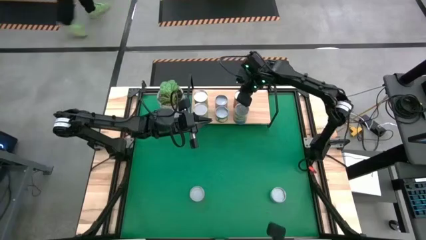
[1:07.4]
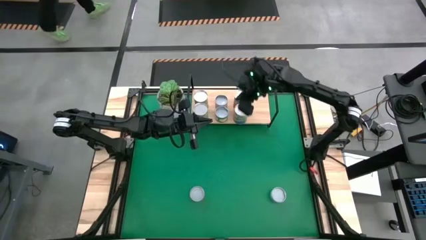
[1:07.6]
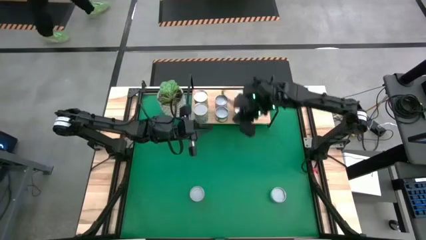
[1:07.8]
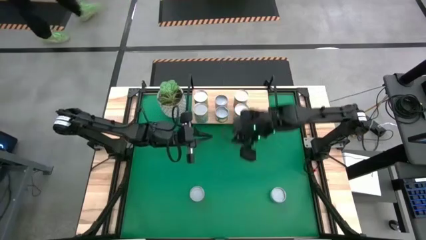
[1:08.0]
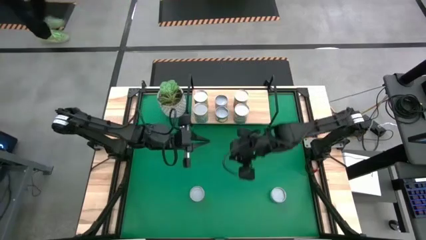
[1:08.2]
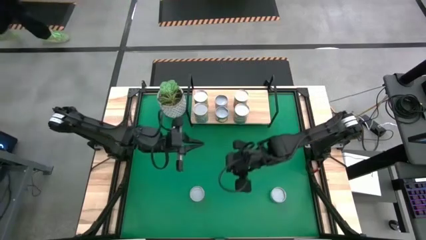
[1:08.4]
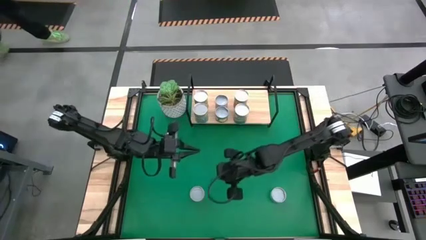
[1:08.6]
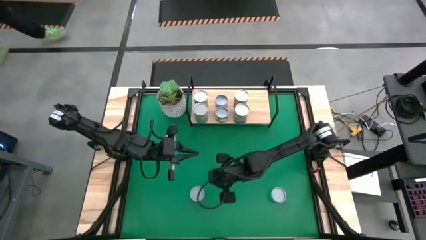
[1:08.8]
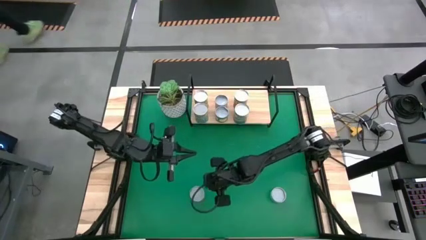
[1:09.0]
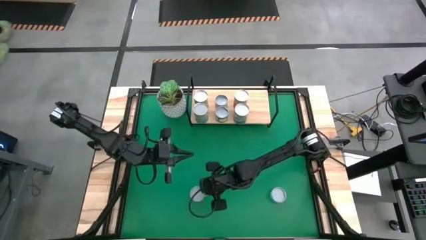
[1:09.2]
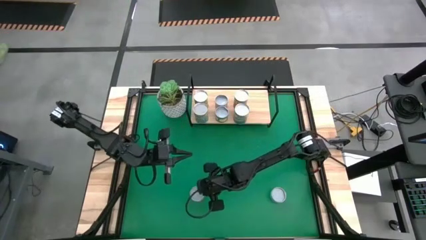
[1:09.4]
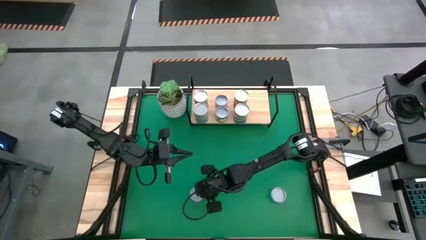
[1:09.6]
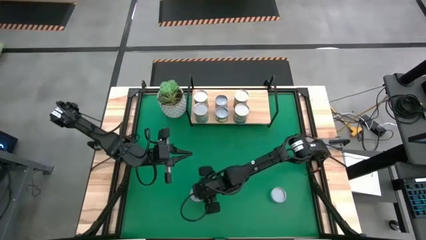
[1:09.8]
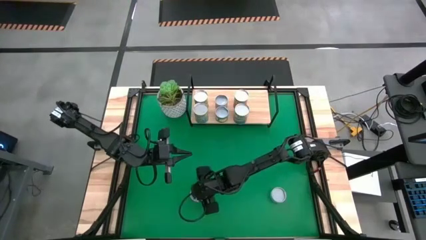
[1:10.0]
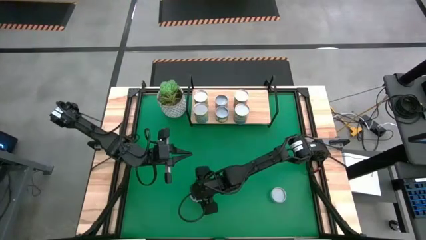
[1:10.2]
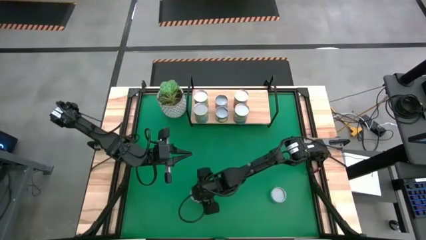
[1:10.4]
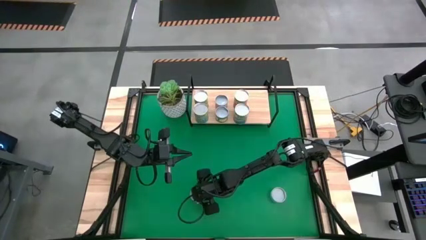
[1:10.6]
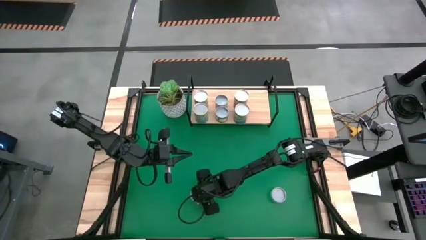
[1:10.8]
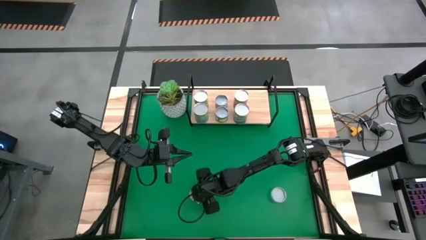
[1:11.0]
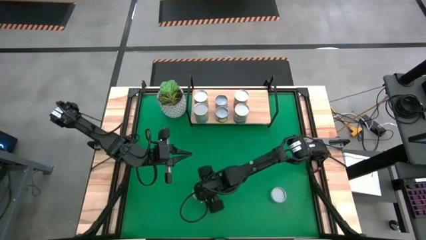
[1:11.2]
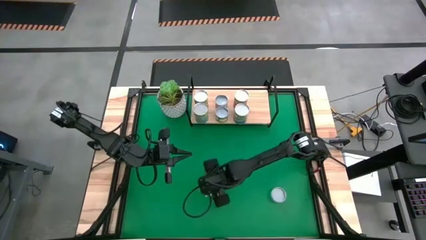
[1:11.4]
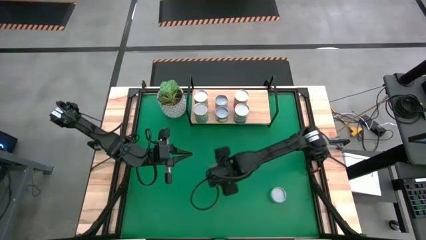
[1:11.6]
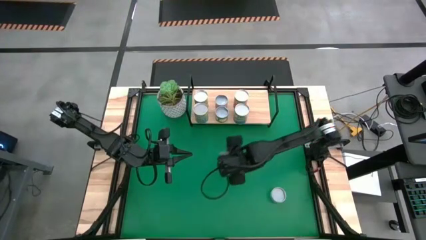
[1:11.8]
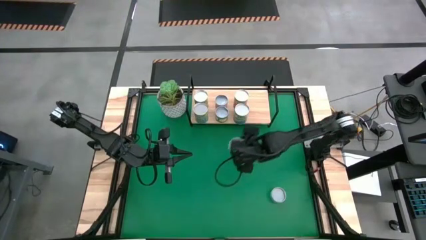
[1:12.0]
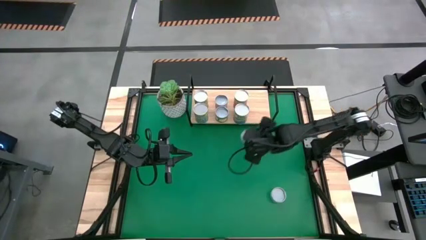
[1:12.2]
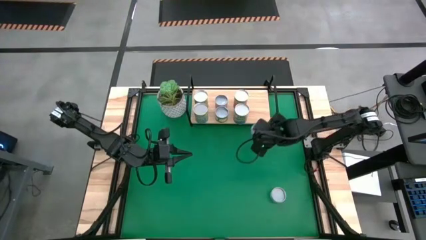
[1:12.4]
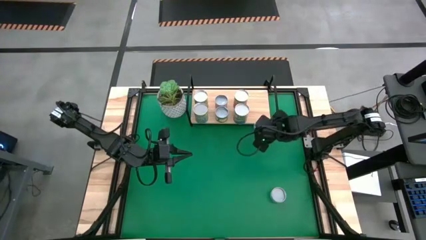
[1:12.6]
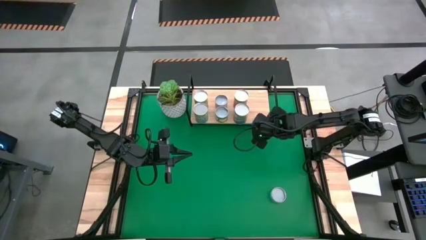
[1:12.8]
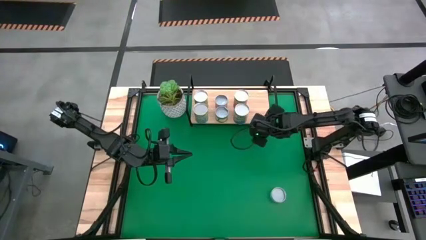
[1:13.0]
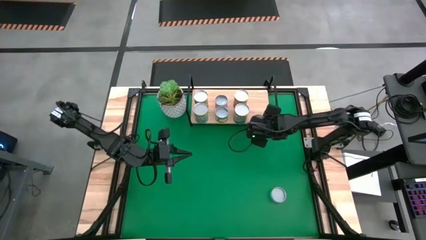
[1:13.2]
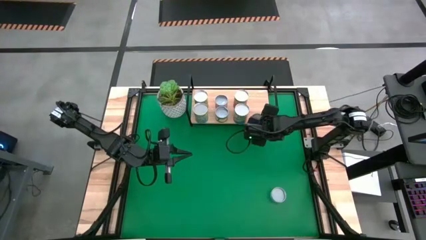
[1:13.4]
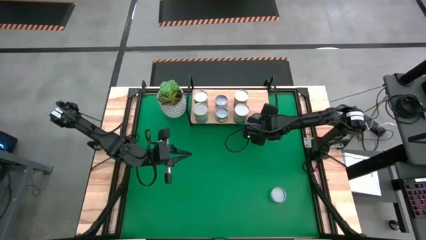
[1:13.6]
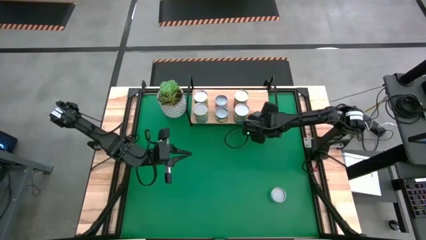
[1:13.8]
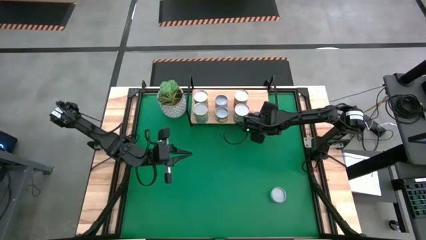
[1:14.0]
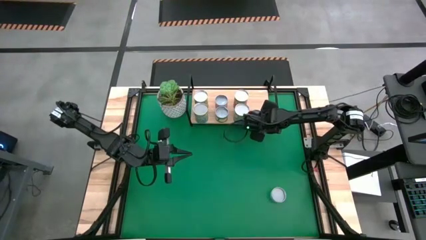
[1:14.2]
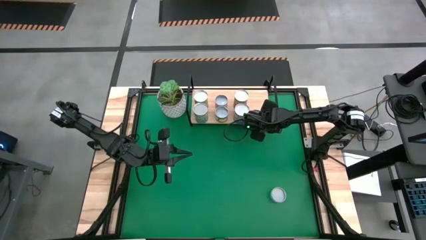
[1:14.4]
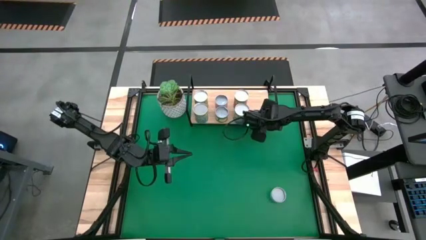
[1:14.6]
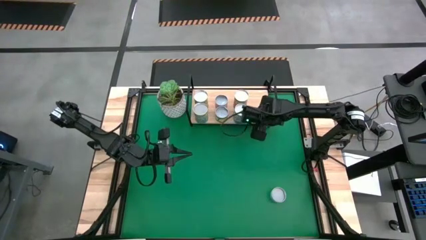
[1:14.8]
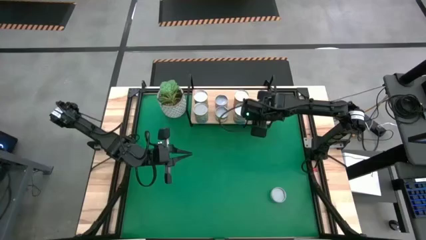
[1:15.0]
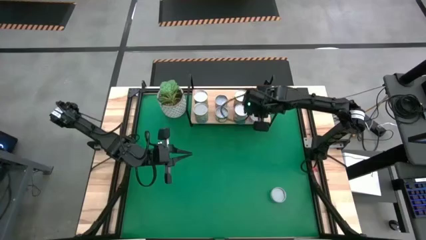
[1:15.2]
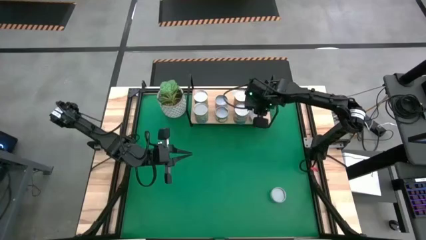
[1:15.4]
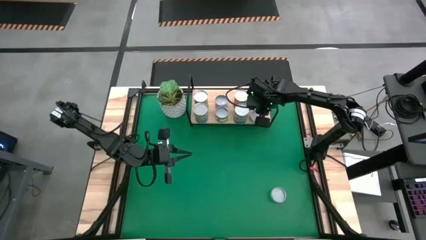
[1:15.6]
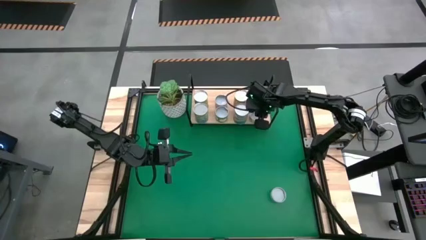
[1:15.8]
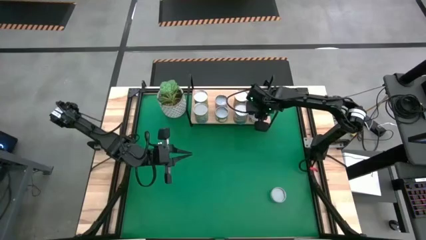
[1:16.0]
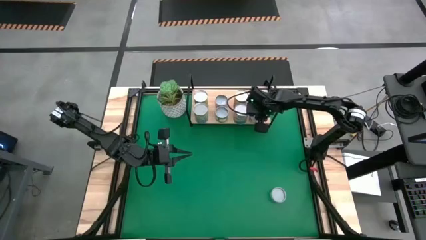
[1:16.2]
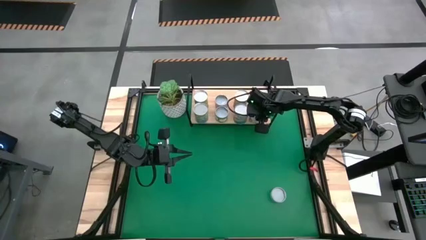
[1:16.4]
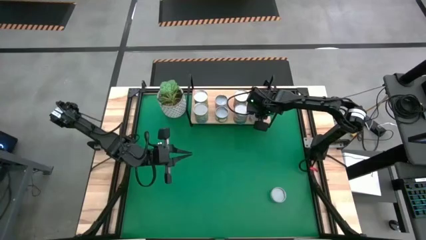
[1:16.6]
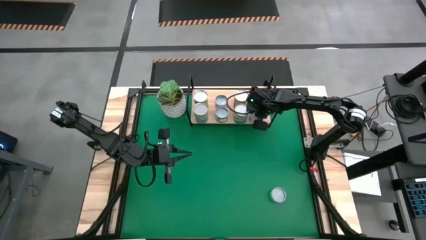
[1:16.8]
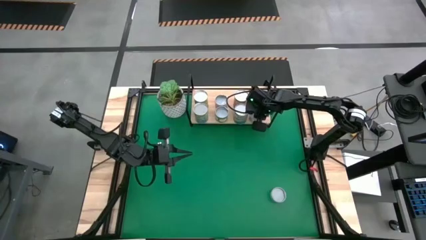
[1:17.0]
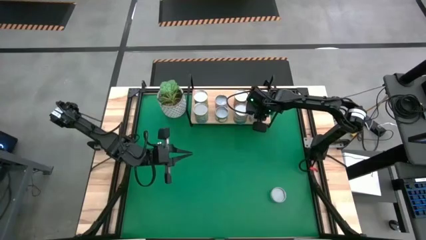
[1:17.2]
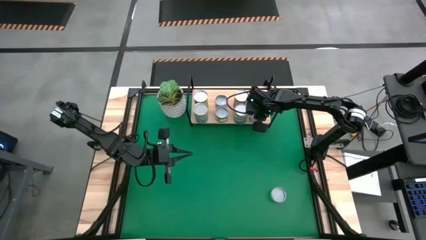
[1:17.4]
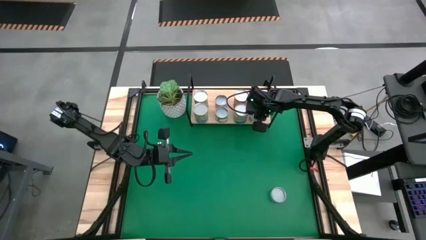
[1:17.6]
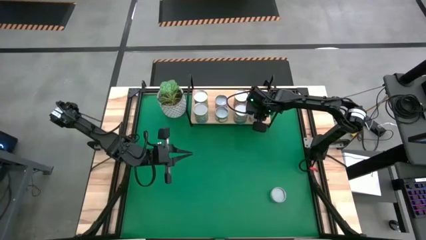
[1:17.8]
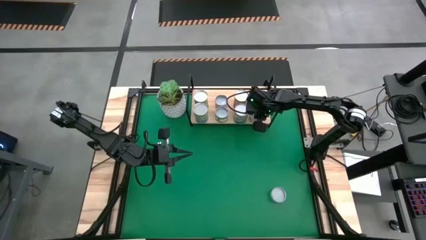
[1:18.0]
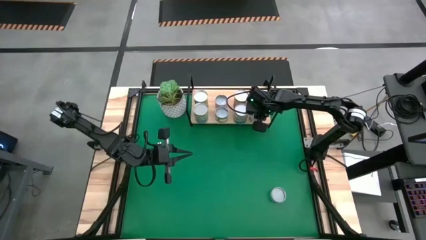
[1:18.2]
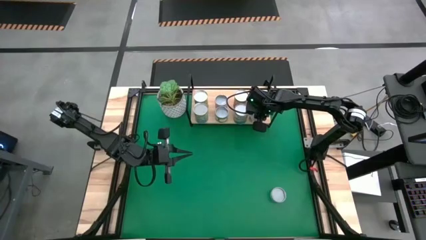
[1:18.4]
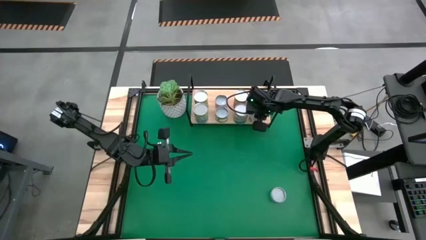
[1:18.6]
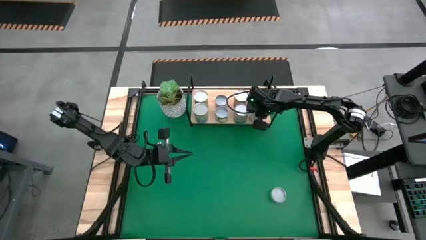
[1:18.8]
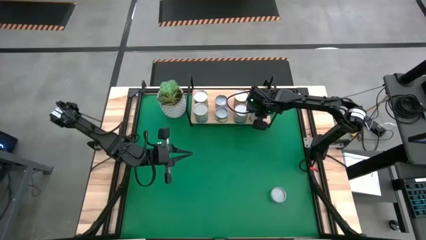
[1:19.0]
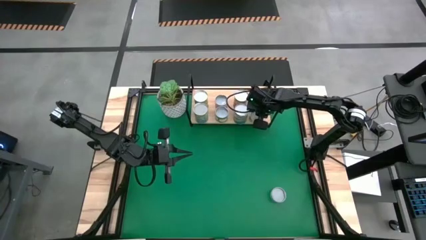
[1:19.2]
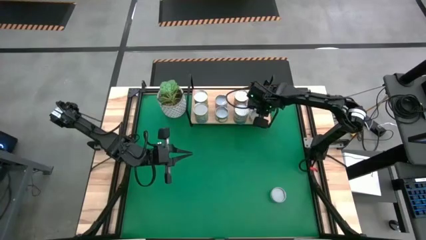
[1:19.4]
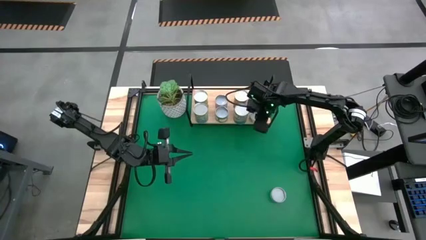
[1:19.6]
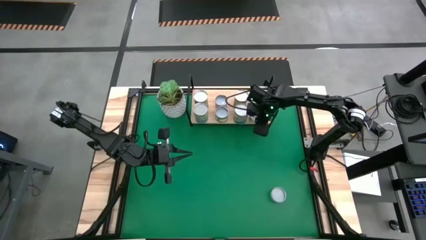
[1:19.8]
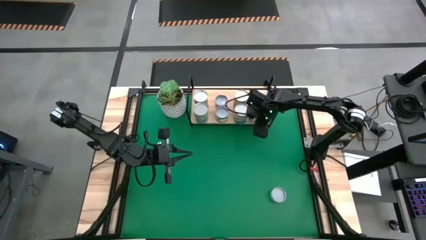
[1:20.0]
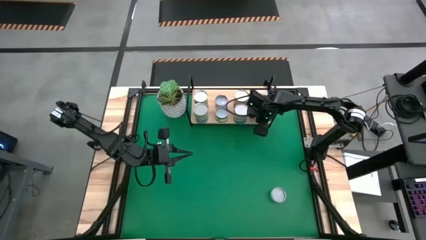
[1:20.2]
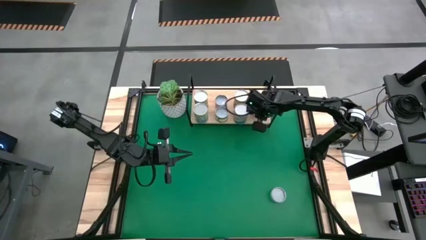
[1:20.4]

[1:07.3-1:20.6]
Task: Pick and place cans onto a shelf
Put the canned mushrooms on the shelf

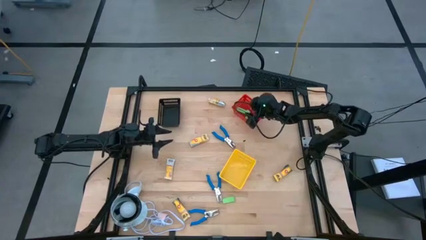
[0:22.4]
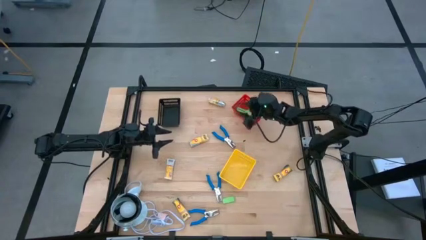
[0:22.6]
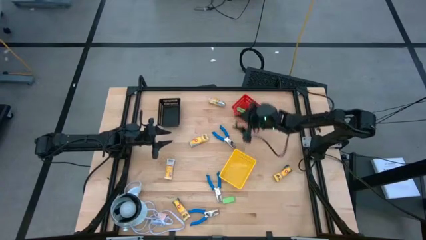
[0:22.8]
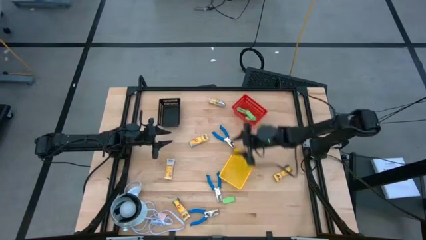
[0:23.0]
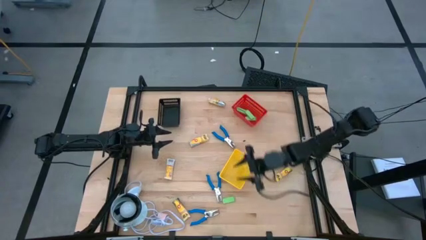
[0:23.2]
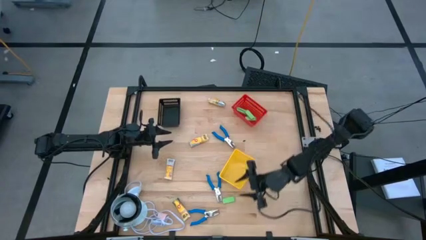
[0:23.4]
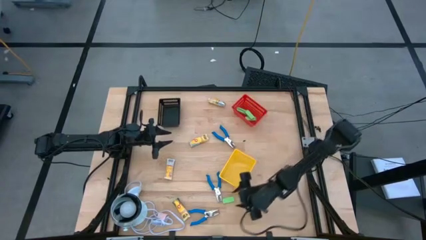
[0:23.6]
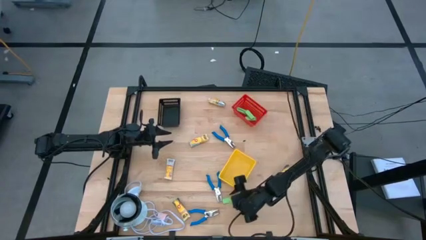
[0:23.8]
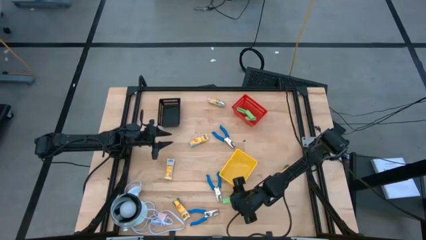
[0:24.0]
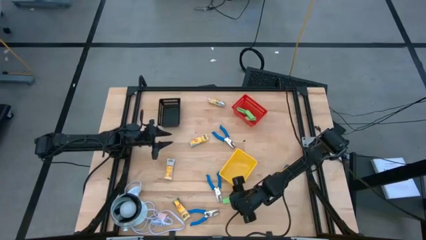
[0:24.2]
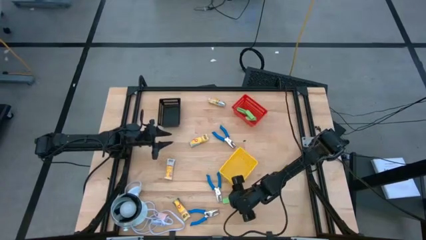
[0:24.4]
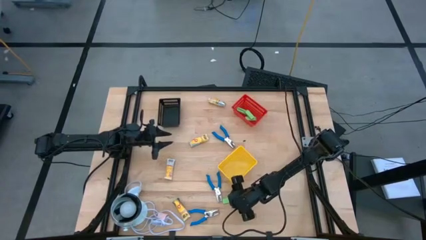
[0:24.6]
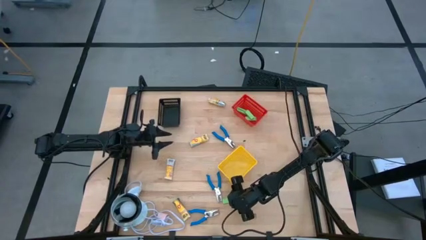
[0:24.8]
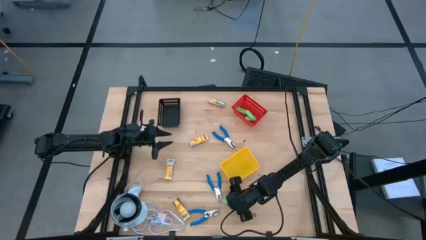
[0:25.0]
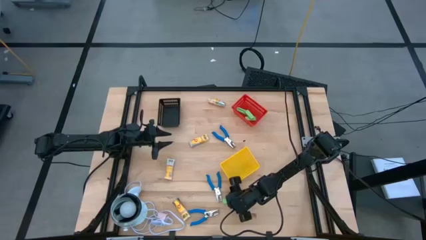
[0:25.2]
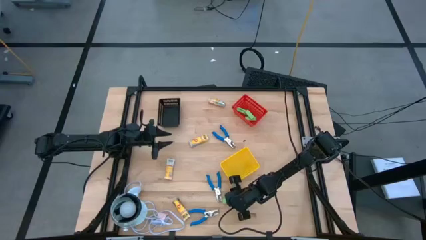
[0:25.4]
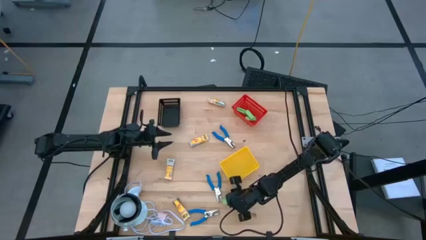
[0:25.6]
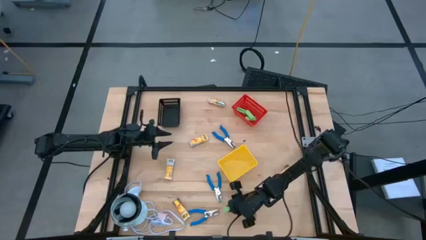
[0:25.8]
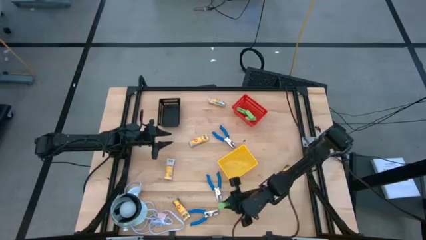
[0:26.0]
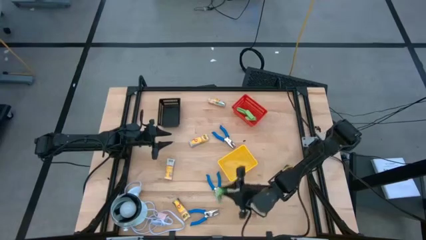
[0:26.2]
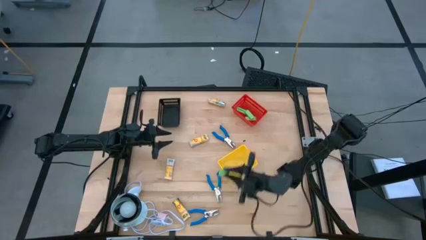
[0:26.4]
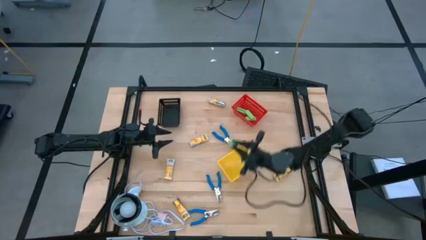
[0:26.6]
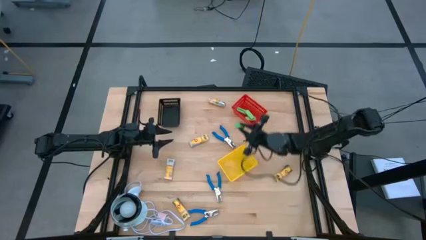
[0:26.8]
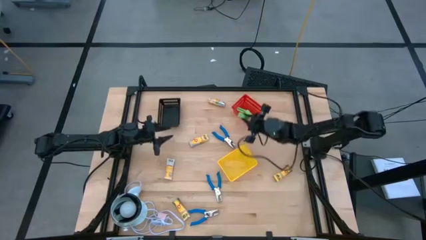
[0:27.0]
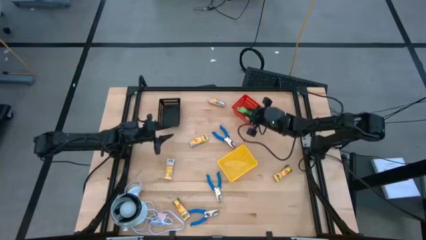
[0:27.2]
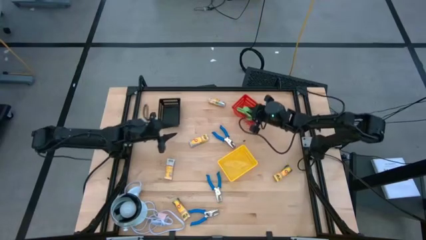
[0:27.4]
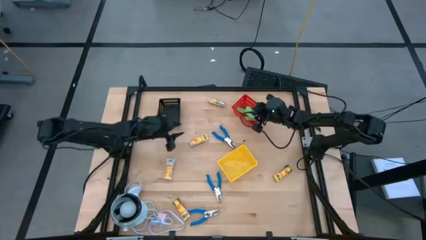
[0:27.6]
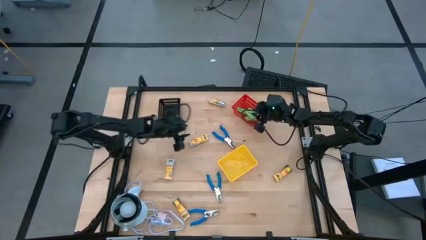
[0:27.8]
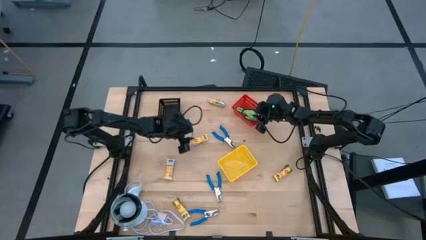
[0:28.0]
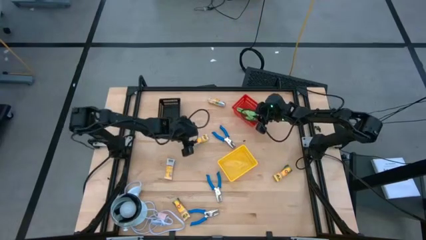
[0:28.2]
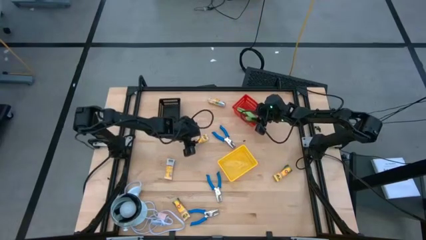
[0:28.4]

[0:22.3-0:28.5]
Task: Pick & Place School Supplies
Put the green eraser into the red bin
